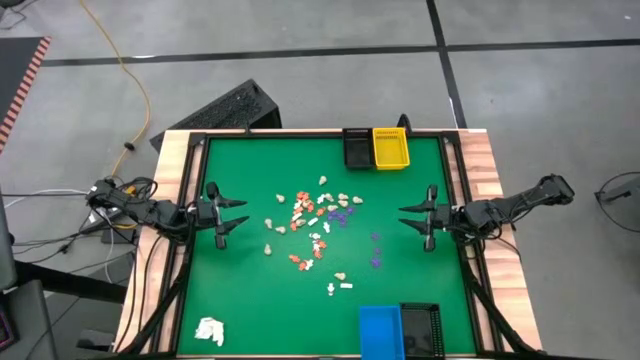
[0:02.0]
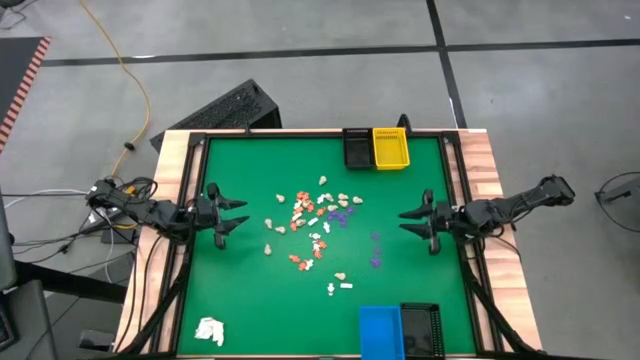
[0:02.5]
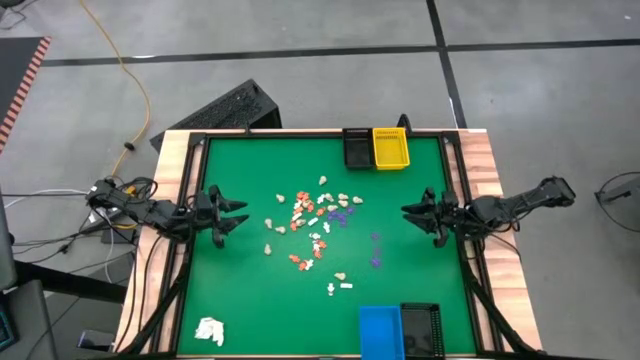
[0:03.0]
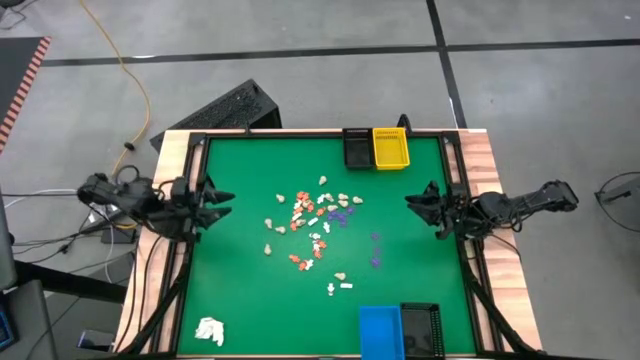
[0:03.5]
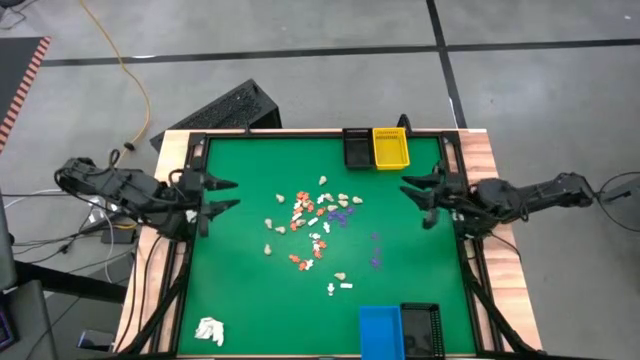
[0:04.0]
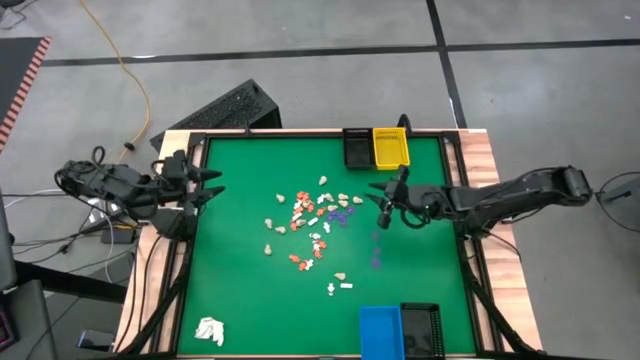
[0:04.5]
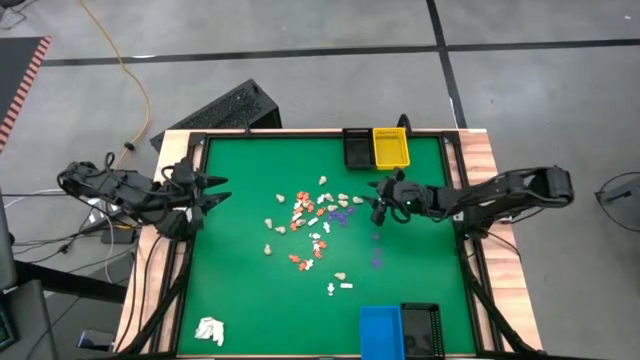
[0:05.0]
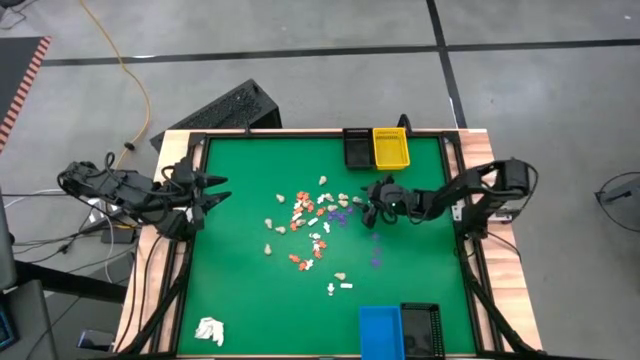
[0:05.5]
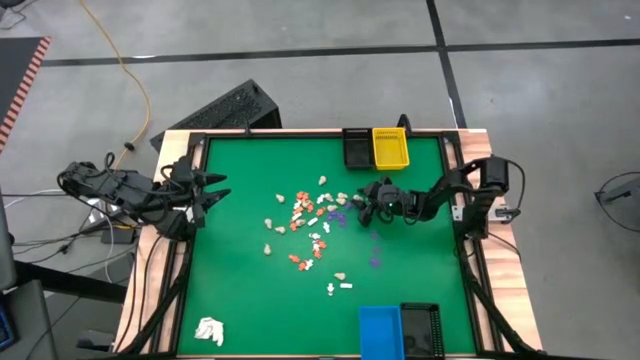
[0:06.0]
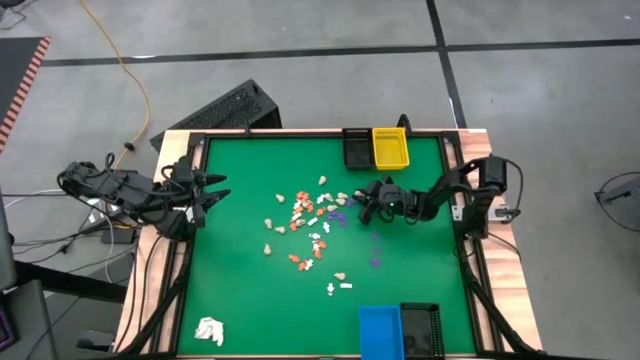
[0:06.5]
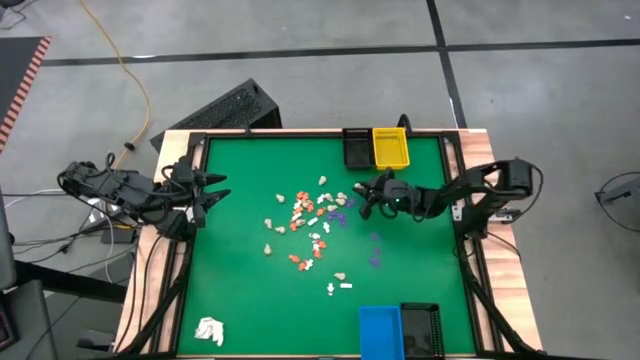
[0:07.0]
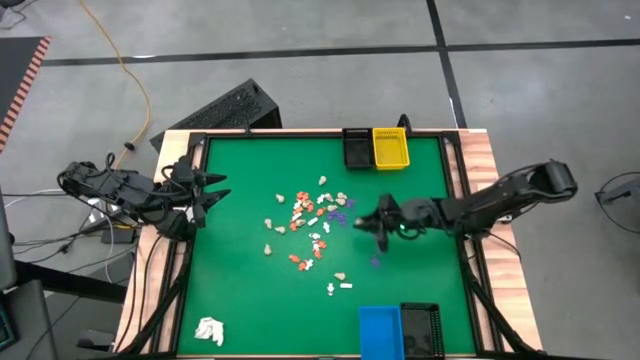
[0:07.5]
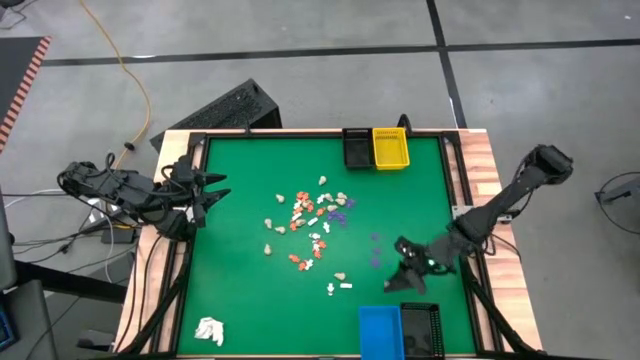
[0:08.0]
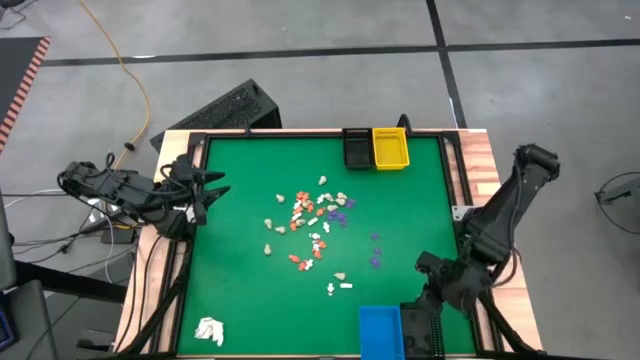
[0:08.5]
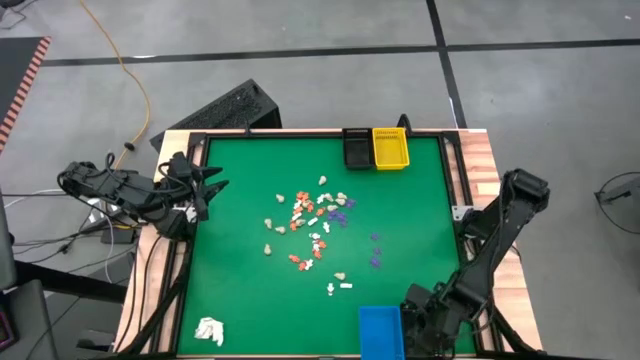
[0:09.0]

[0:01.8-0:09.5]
Task: Sort Halloween decoration
Put the white skull toy into the bottom black basket

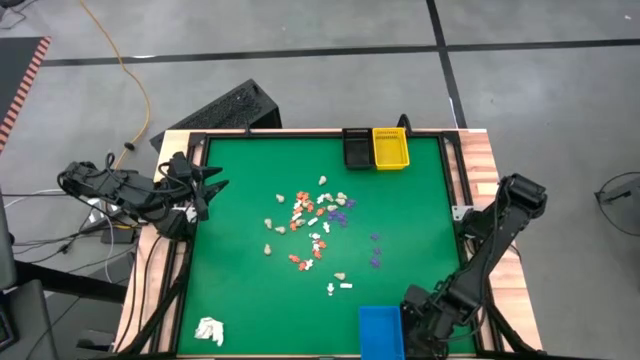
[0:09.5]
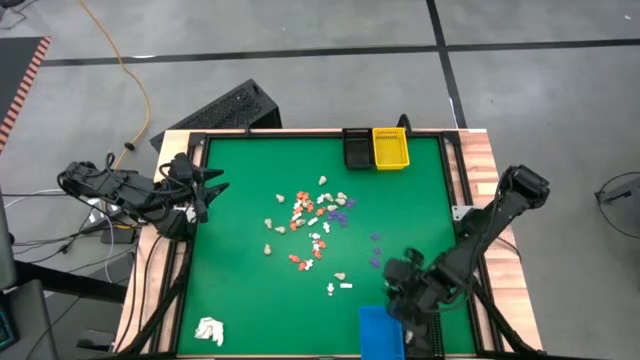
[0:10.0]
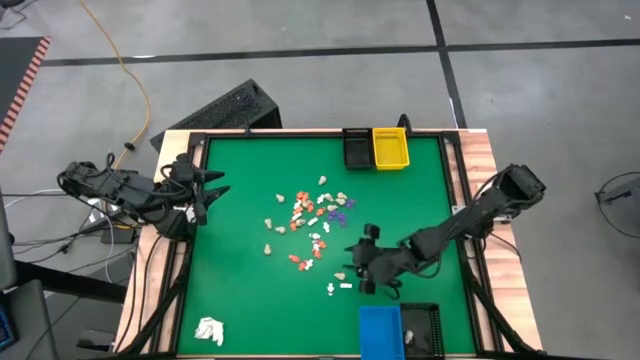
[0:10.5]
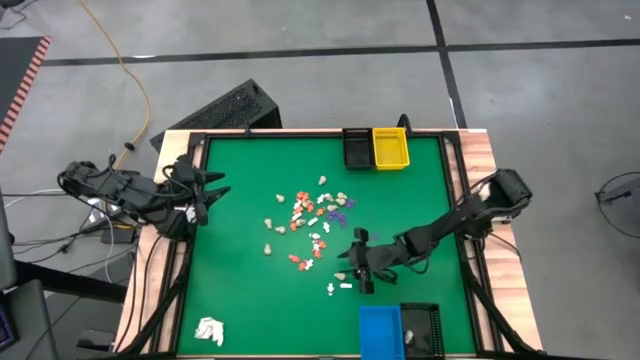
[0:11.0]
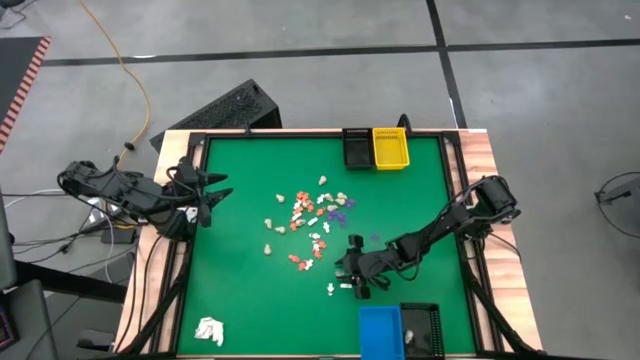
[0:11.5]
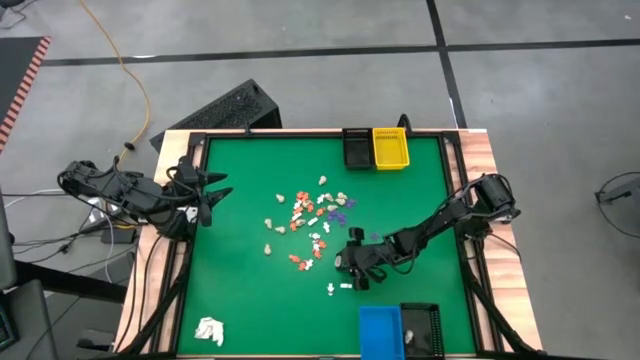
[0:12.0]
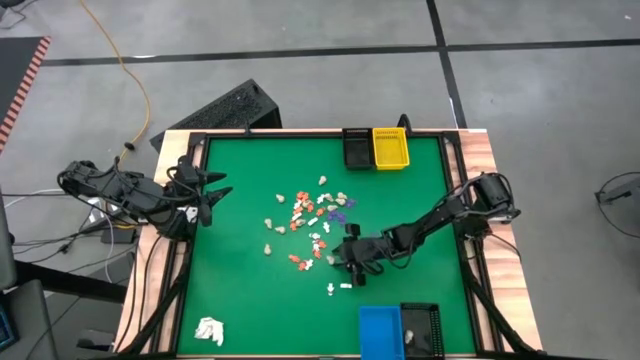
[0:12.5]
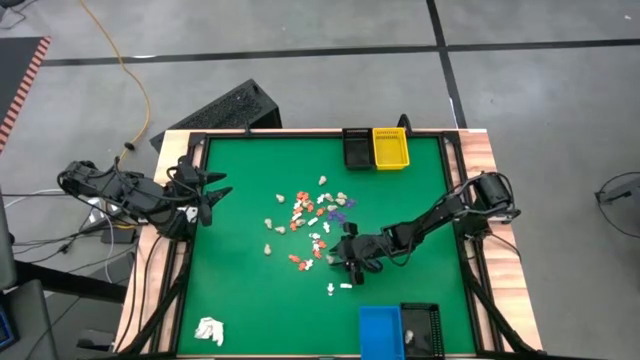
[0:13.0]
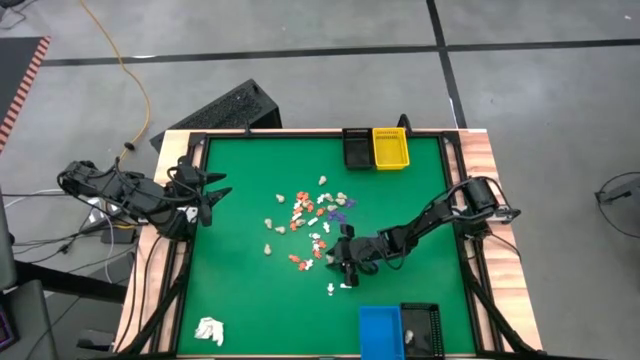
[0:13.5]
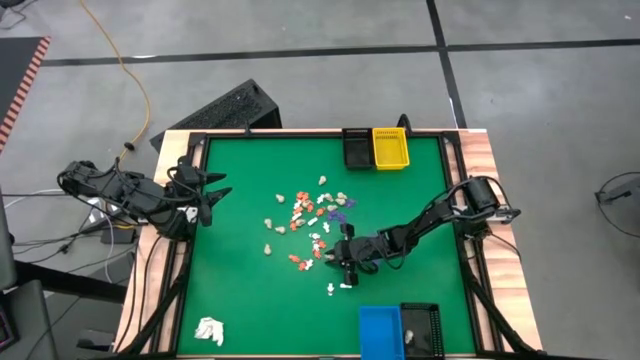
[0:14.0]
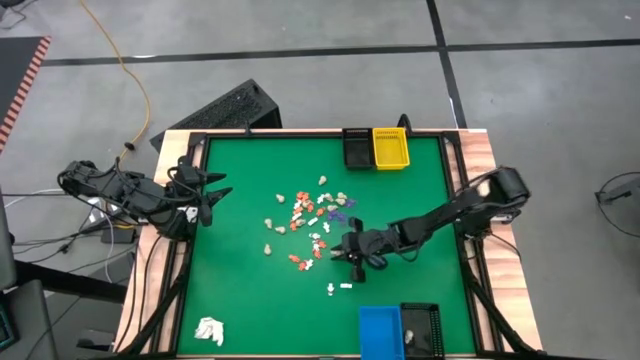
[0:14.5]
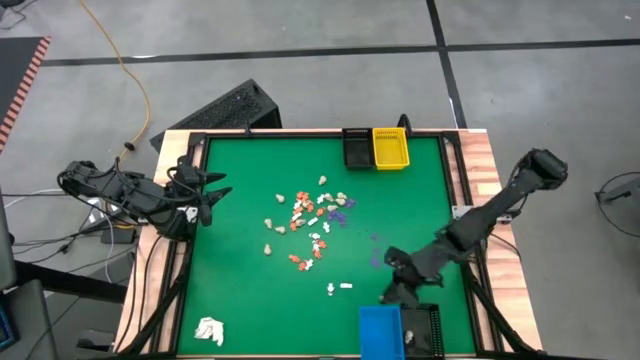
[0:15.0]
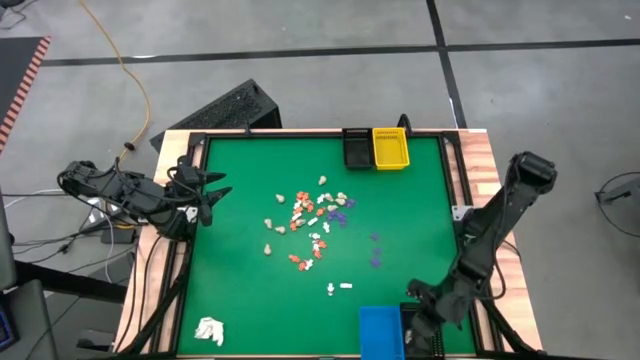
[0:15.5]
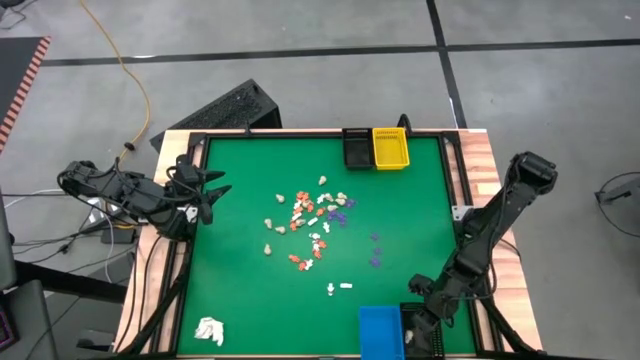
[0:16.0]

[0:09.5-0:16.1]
Put the white skull toy into the bottom black basket

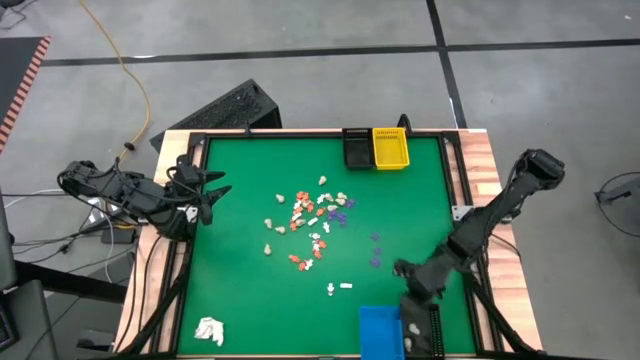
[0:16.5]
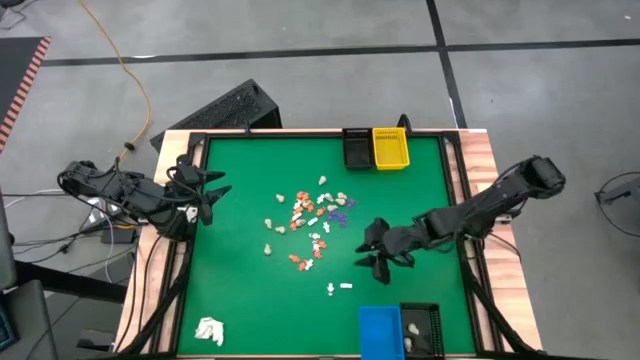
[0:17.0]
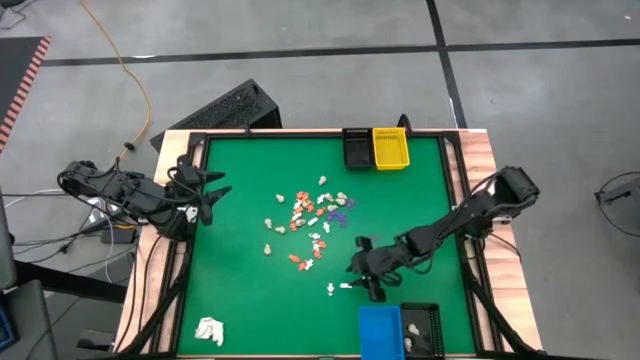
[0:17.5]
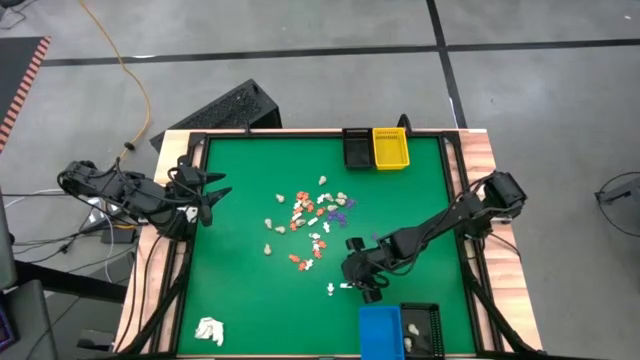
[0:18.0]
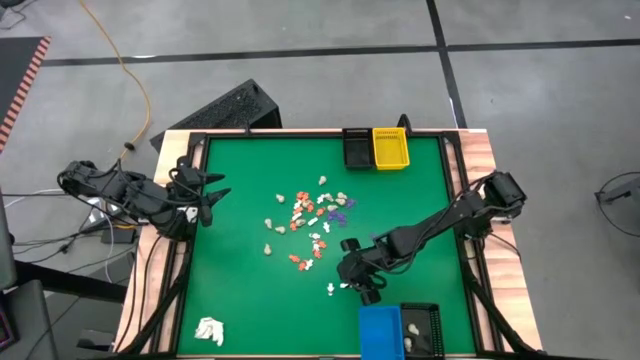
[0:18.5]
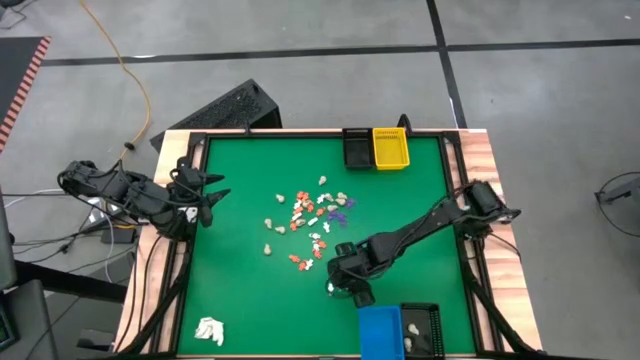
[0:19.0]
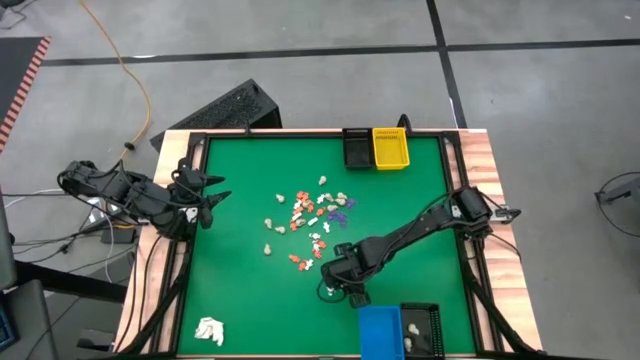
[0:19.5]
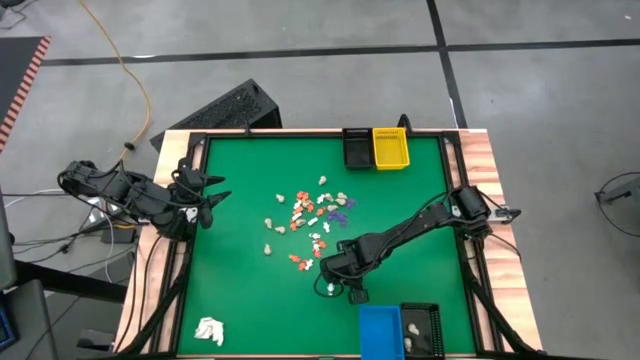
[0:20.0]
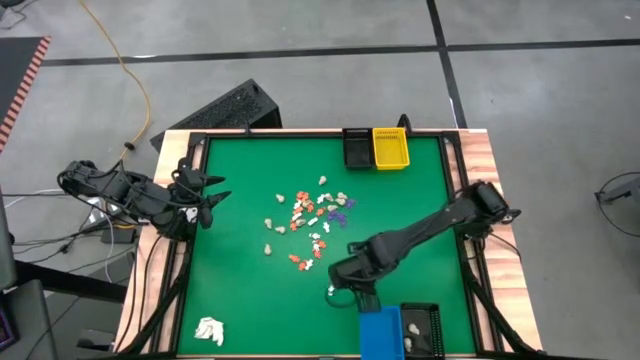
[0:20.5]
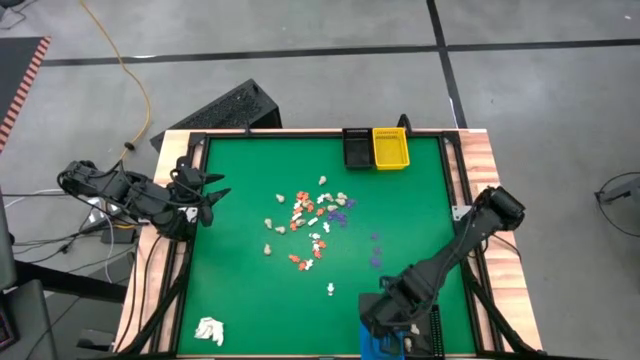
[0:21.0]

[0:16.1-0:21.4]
Put the white skeleton toy into the blue basket

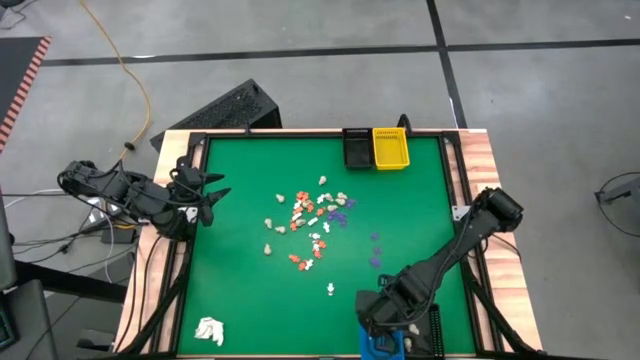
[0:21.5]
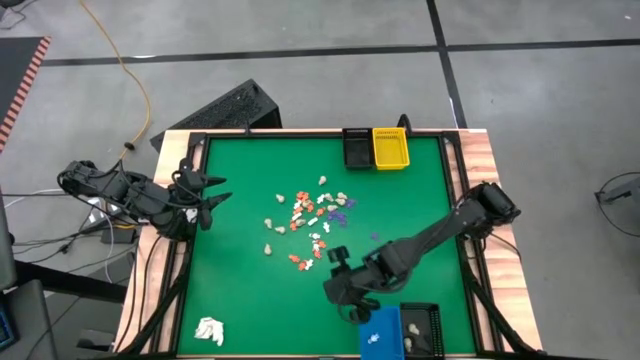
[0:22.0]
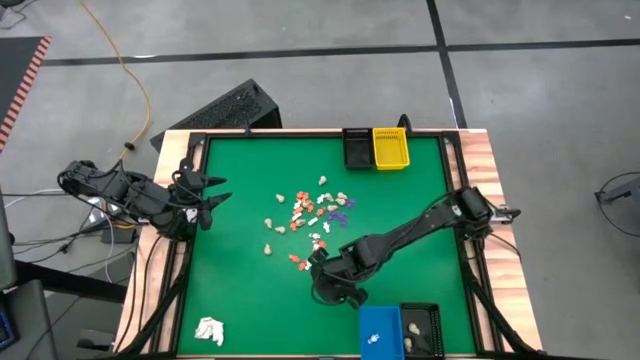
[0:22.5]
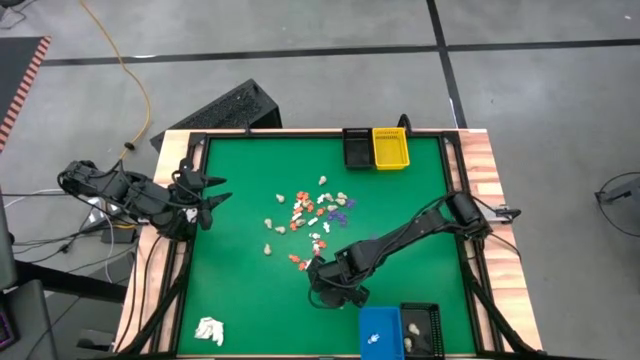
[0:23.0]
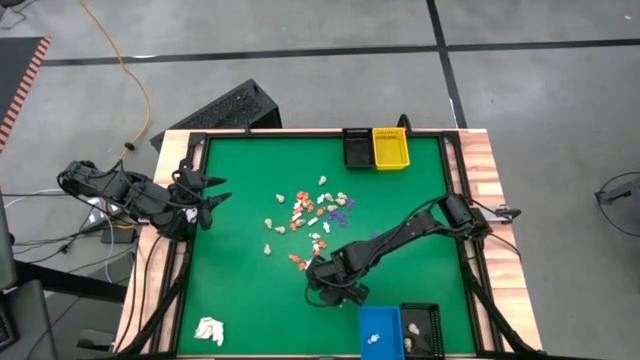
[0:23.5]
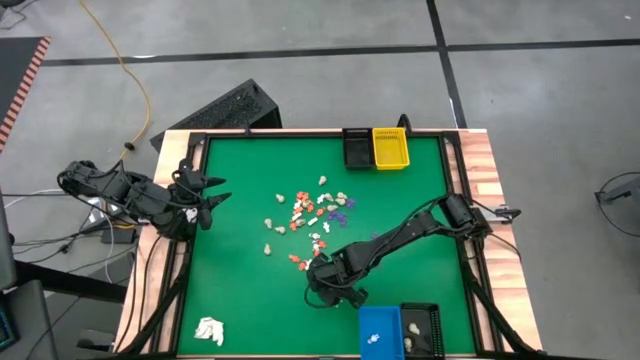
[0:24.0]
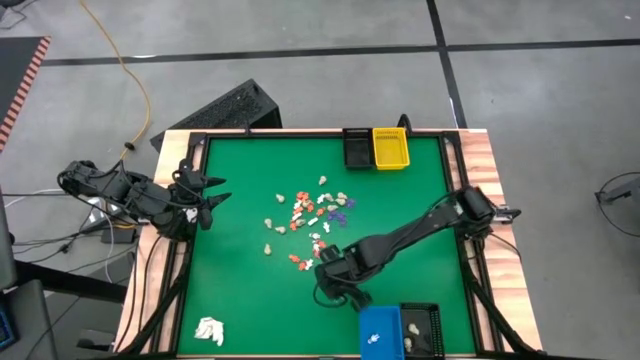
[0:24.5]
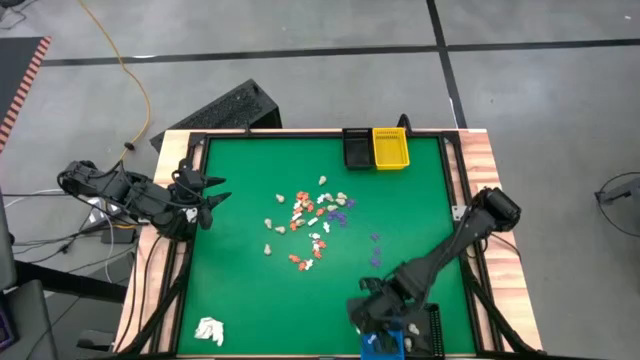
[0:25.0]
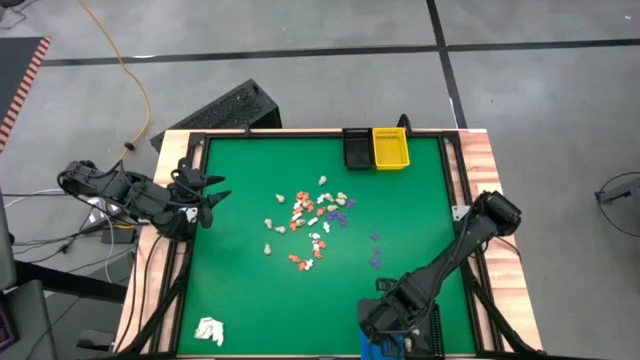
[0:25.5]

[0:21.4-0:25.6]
Put the white skeleton toy into the blue basket
